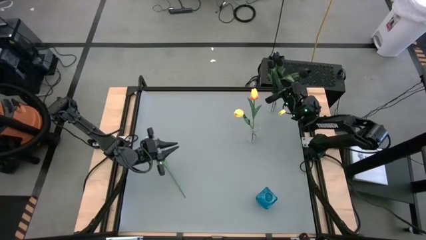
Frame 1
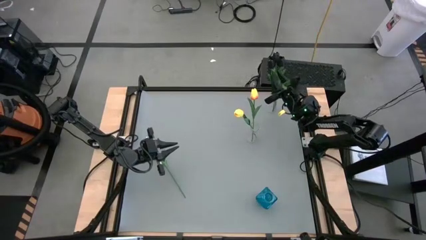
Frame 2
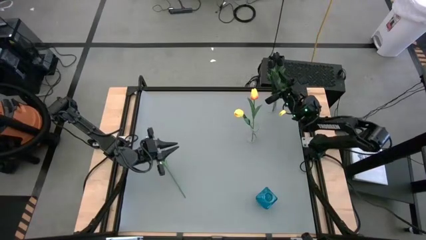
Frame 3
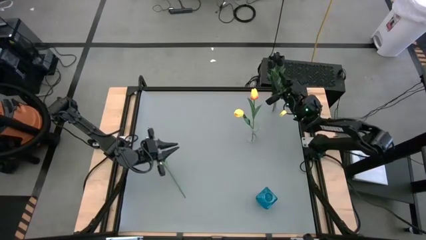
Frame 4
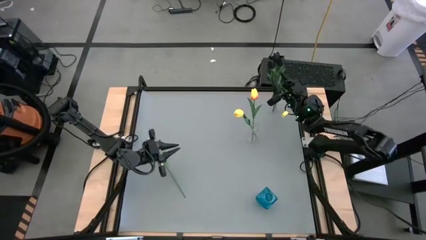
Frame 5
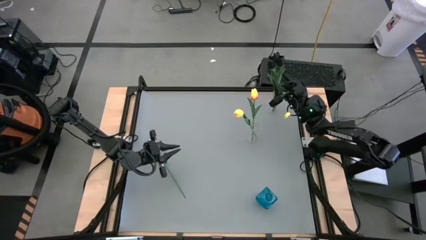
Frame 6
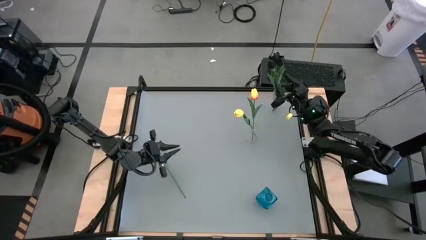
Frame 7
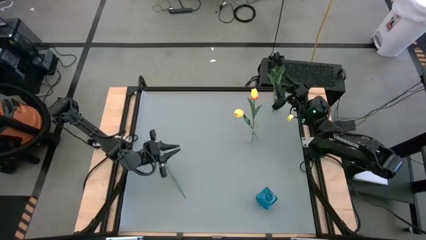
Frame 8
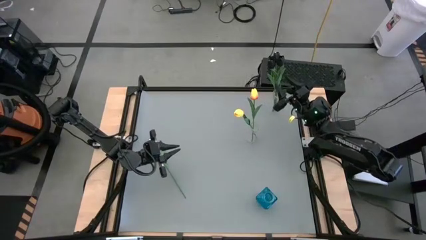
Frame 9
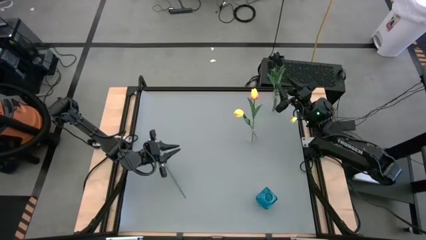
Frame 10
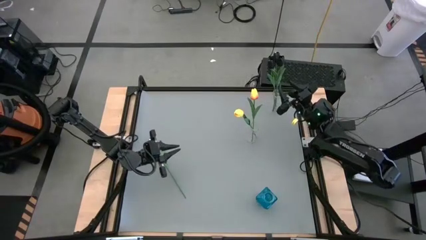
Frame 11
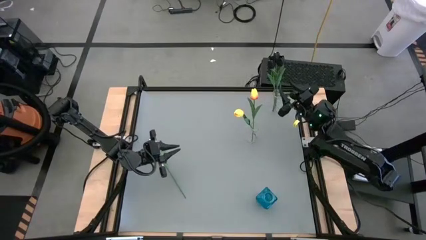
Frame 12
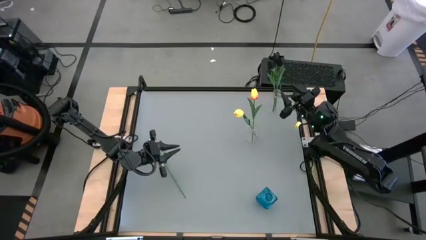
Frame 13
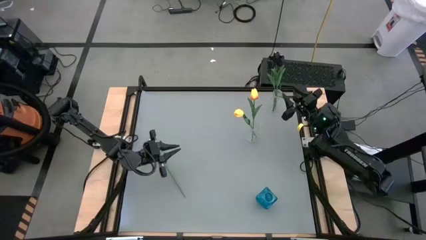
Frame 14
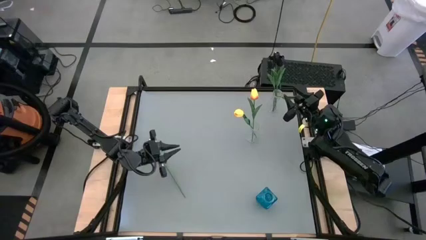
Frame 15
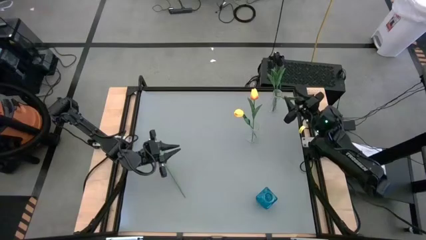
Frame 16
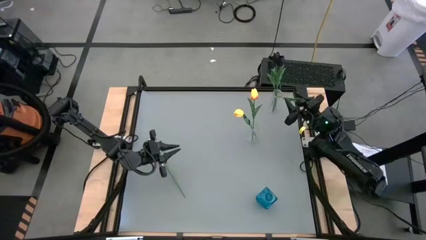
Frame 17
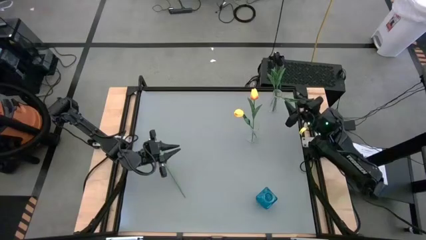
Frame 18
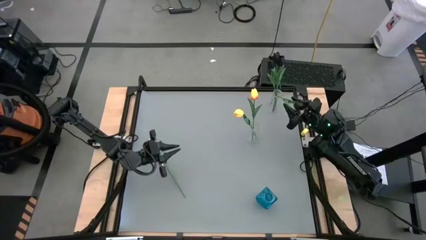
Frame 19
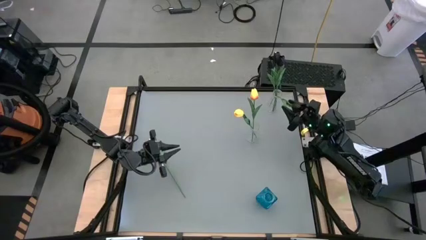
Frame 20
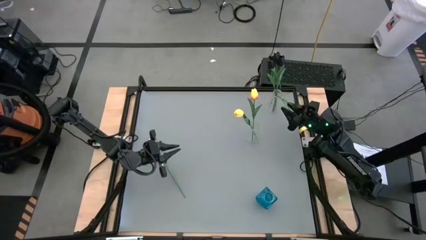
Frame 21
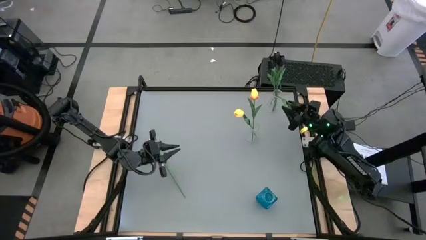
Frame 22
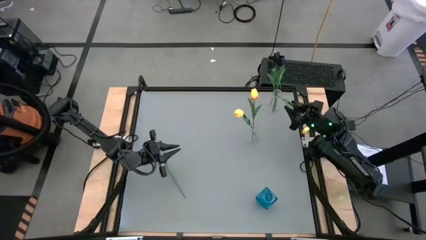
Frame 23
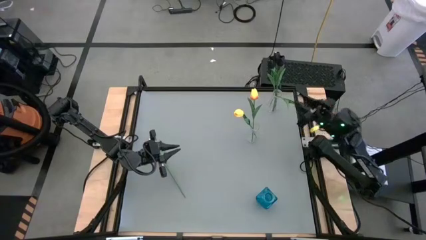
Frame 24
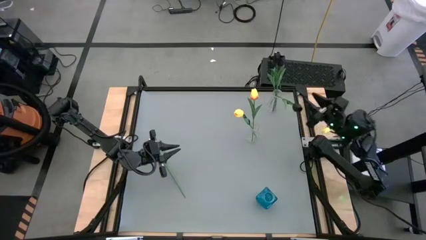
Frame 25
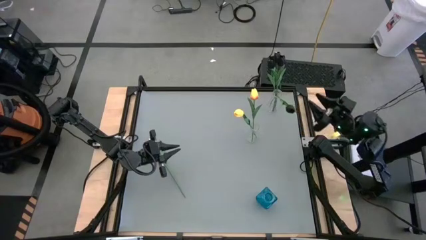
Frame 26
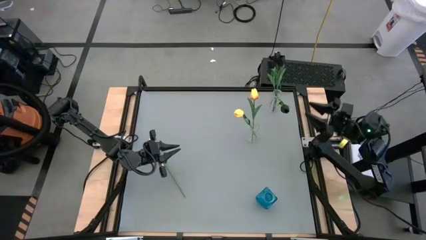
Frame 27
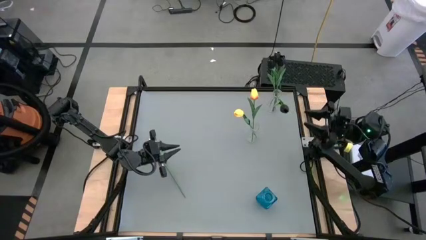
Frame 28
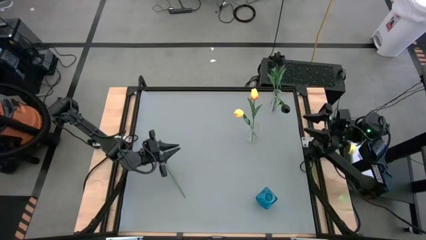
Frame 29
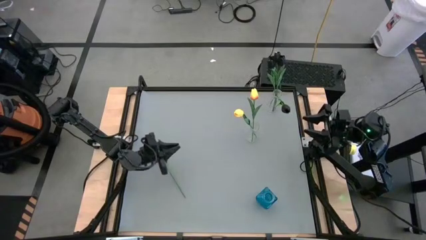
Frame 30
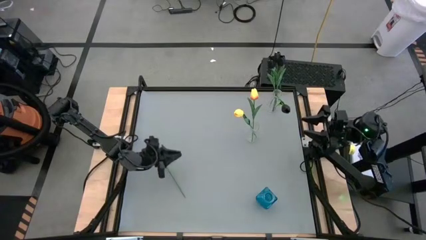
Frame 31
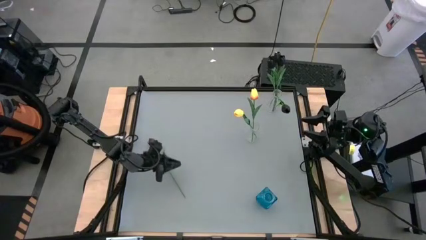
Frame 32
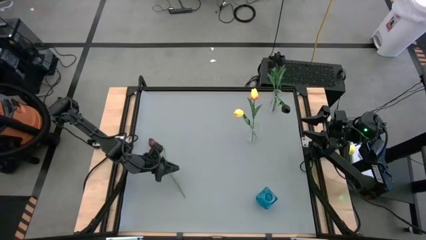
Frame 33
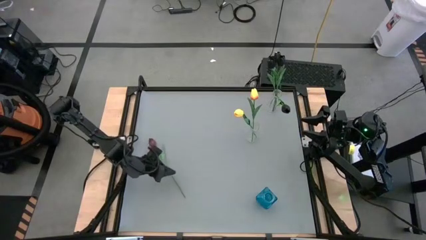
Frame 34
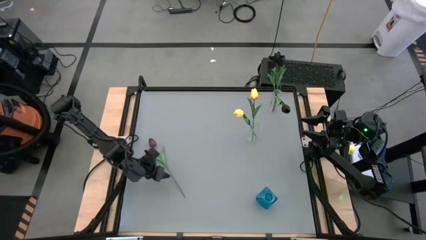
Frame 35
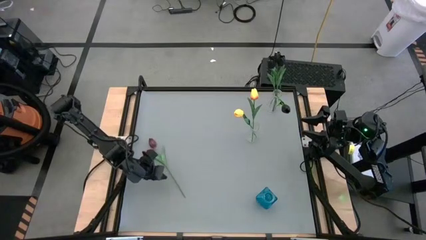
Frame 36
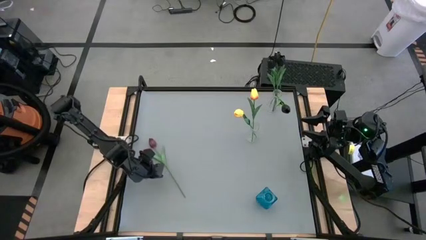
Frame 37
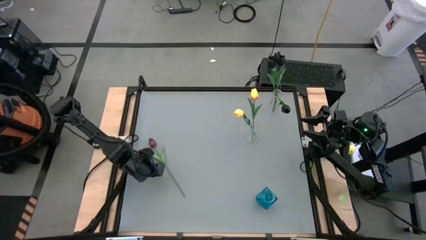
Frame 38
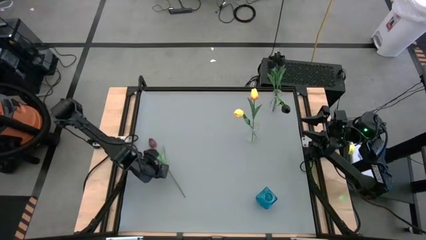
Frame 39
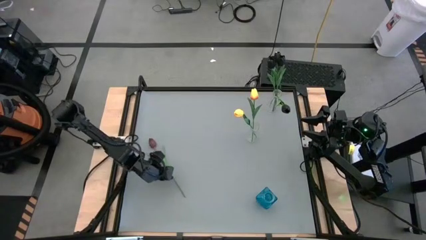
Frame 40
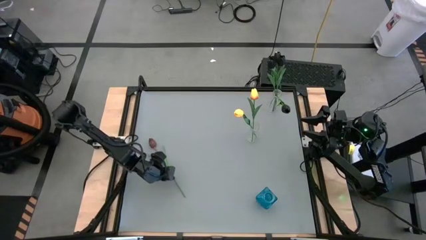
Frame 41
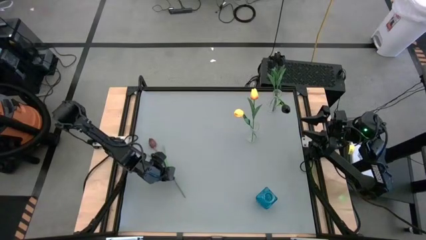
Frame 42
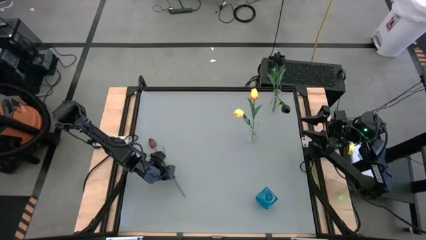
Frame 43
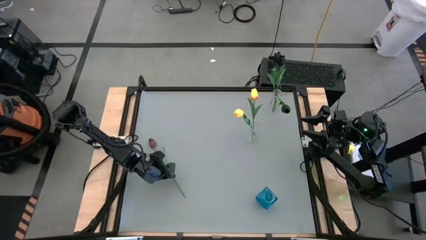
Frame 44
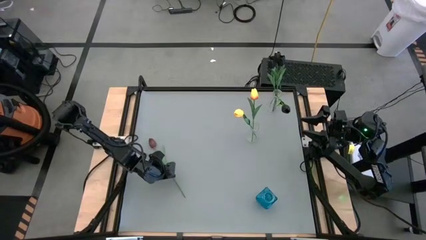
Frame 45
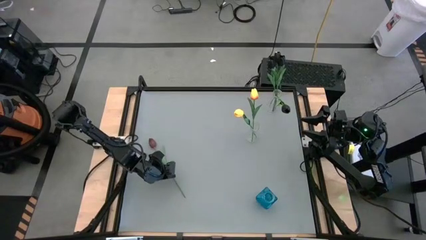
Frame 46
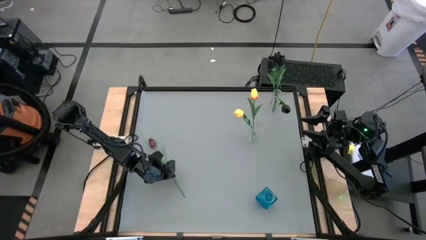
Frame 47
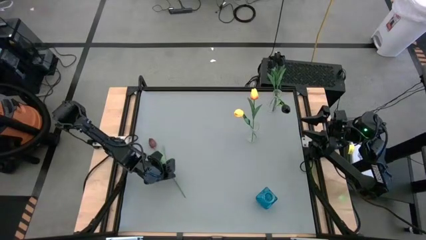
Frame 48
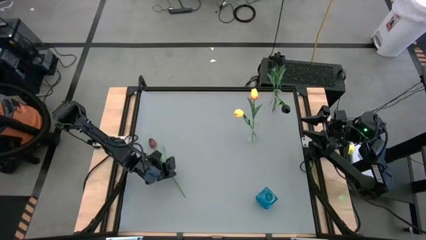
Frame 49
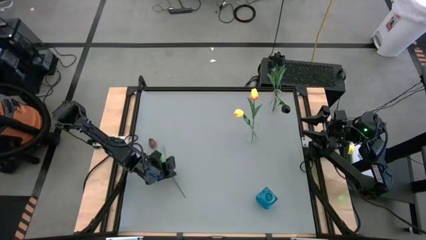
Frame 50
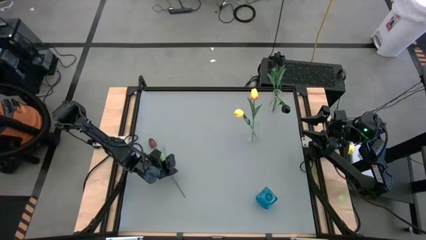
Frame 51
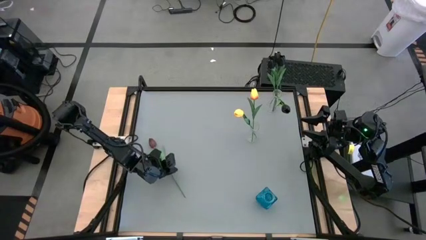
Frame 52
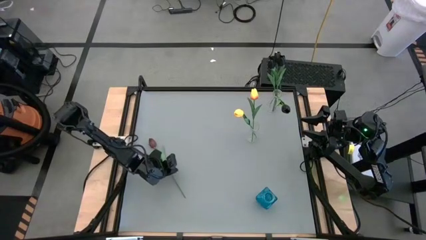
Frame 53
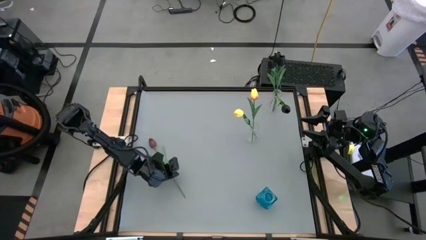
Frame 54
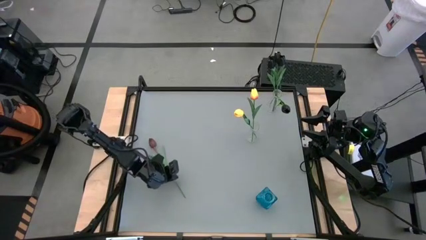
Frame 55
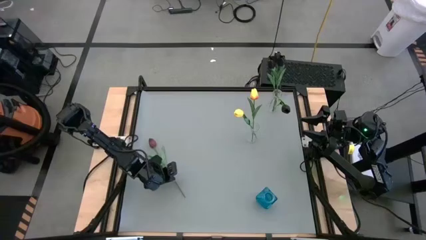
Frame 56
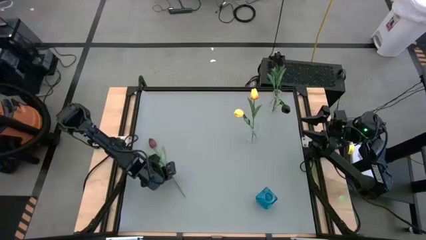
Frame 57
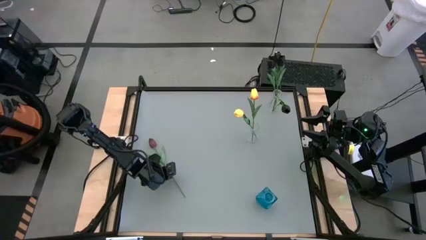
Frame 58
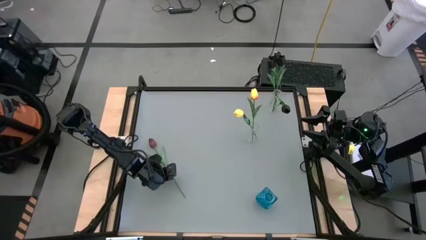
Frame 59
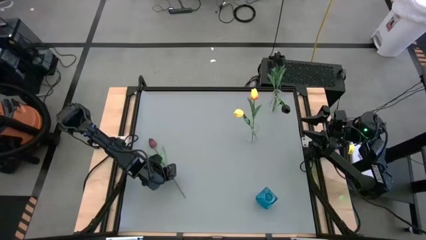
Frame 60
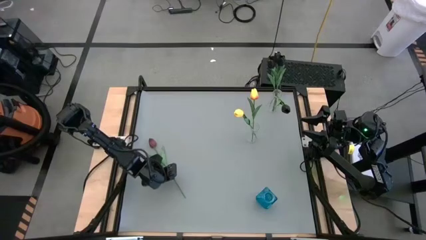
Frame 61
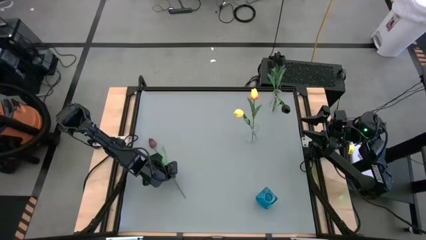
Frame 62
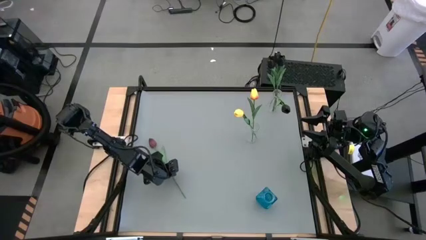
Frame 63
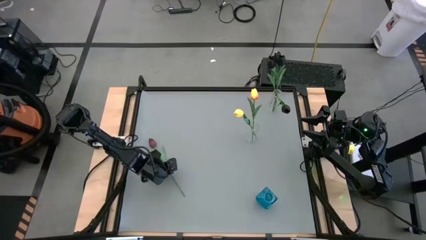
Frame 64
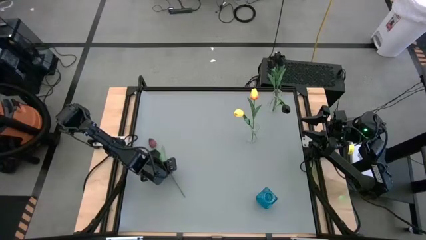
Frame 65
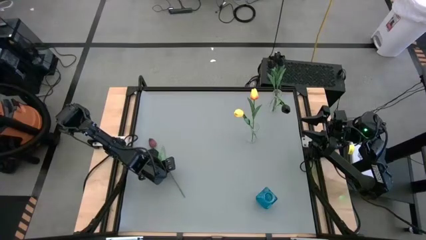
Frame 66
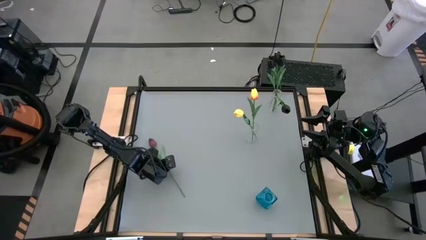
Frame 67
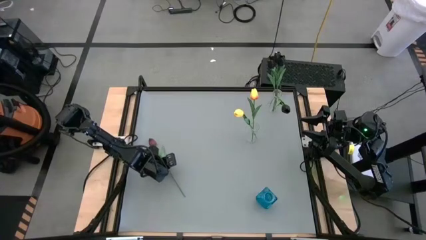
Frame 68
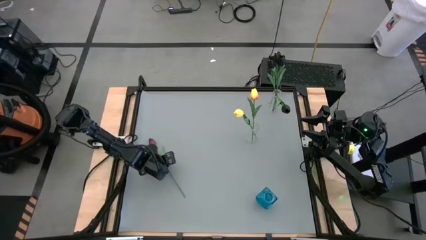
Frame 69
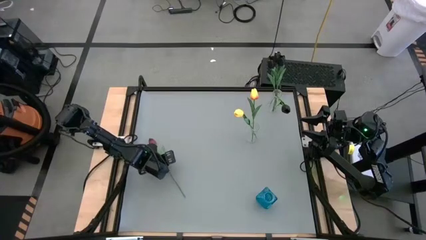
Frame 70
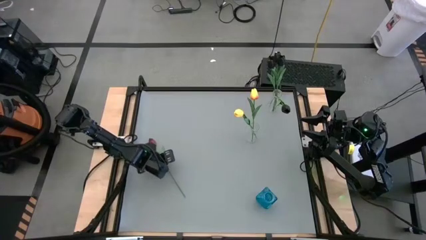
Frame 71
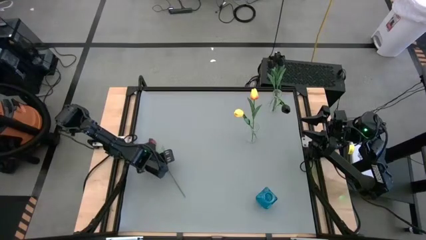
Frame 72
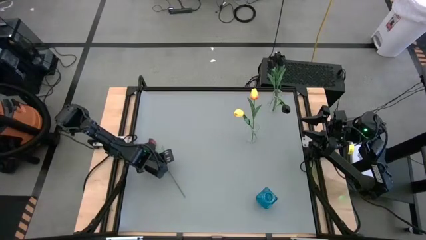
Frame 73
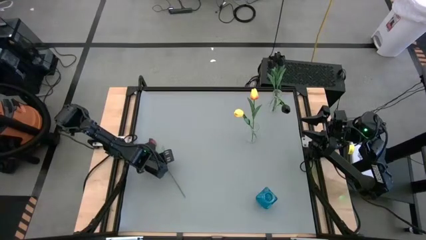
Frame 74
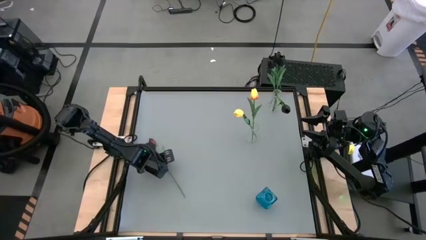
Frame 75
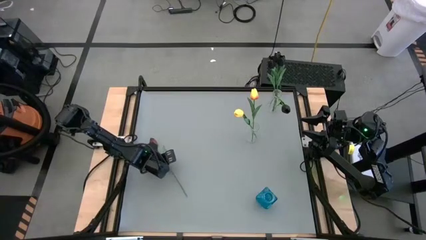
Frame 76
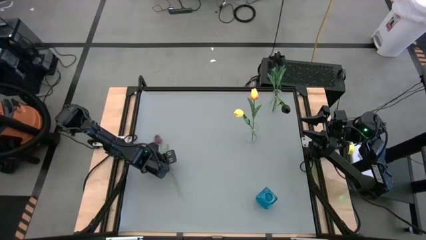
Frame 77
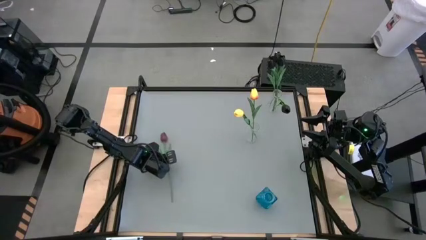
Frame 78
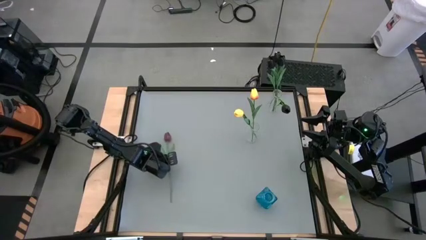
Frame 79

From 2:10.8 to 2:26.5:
Task: Sort flowers into vase by color
Put the red tulip into the blue vase
